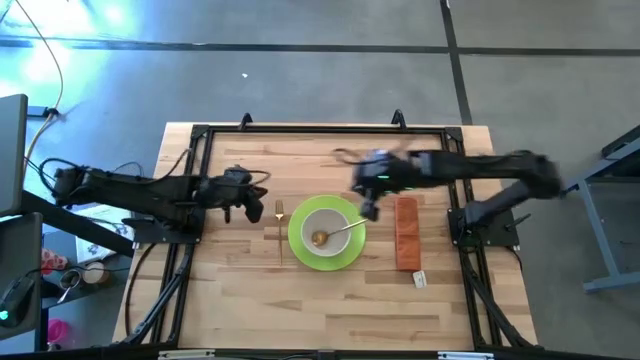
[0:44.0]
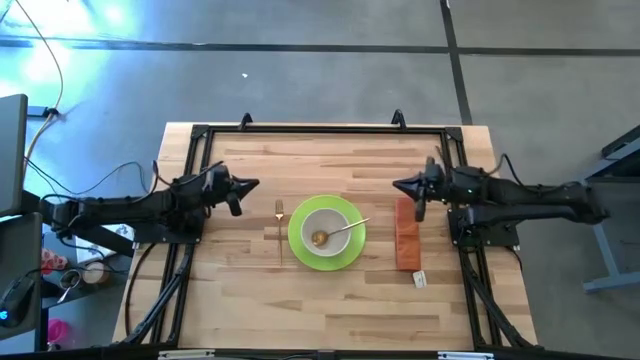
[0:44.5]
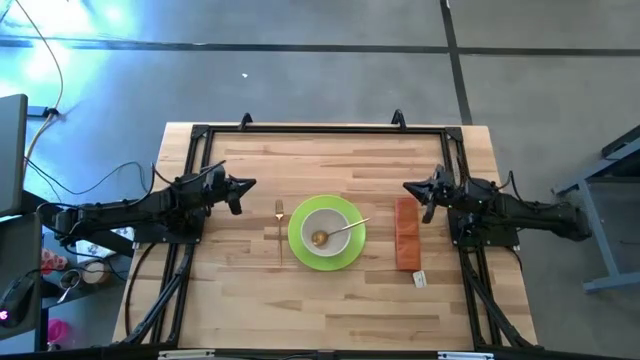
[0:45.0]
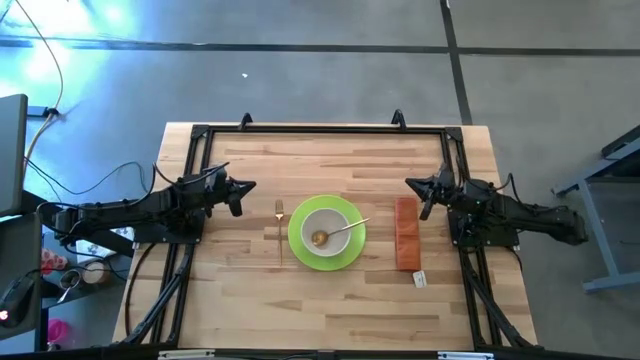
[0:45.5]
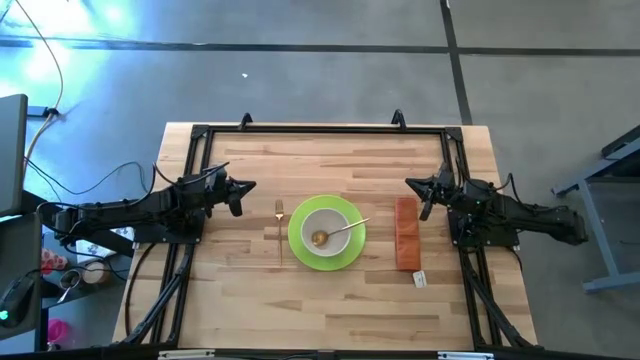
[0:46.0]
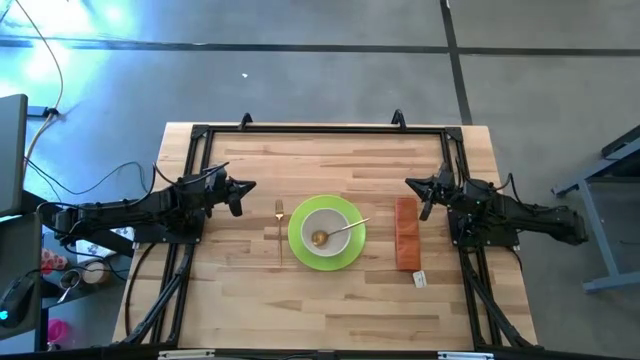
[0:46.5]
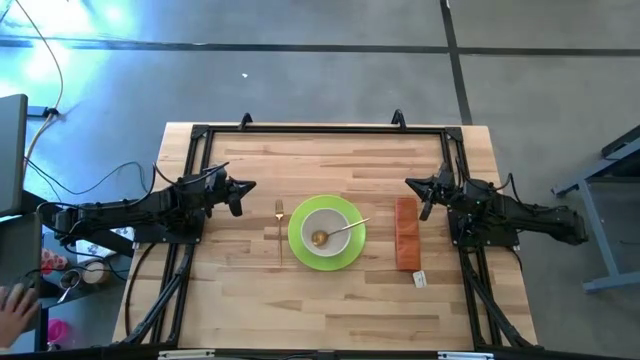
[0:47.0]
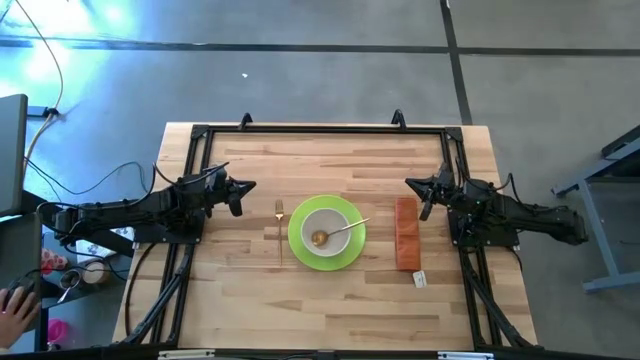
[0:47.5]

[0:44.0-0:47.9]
Task: Set table place
Return to Home Position

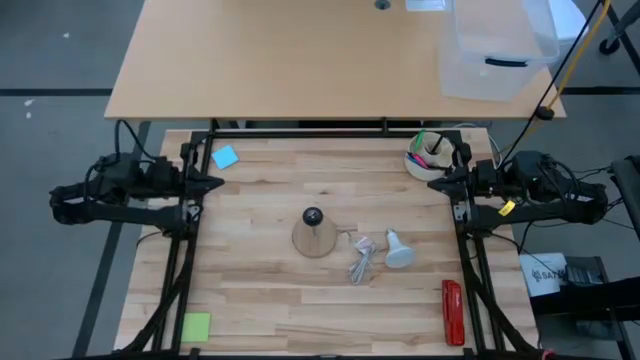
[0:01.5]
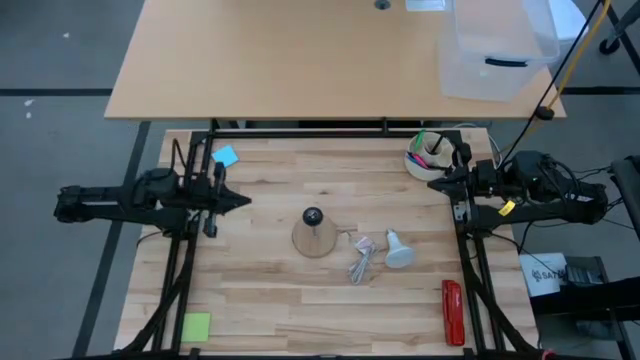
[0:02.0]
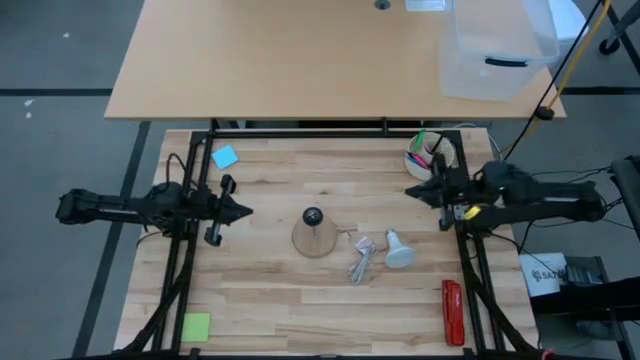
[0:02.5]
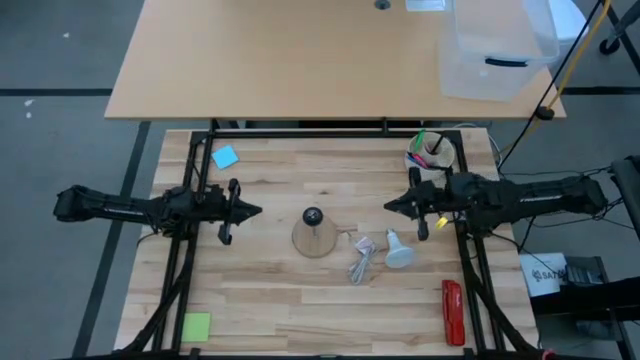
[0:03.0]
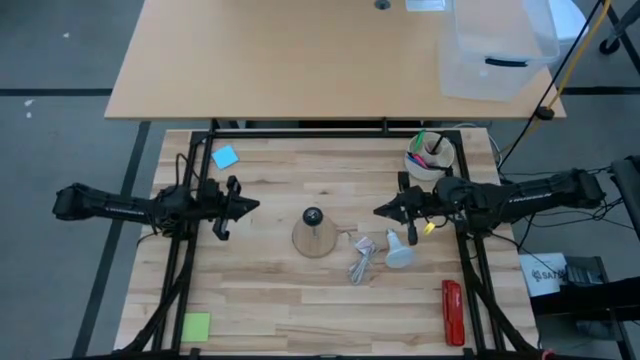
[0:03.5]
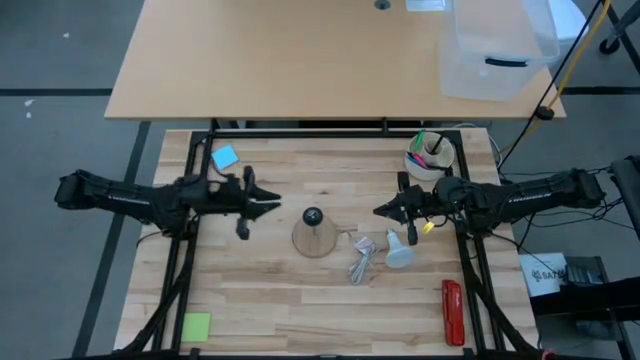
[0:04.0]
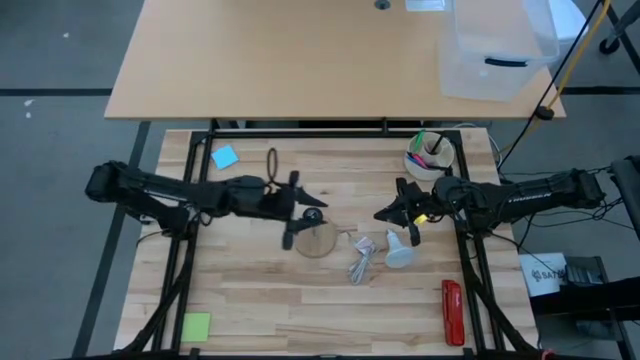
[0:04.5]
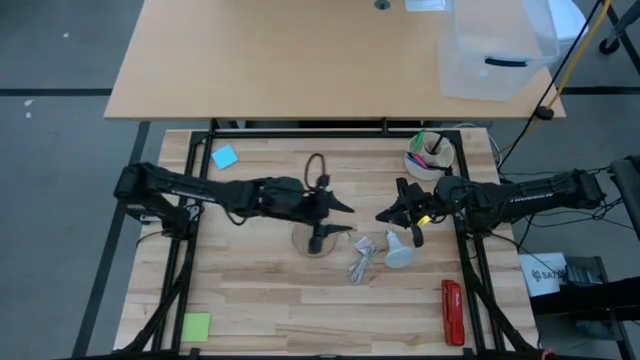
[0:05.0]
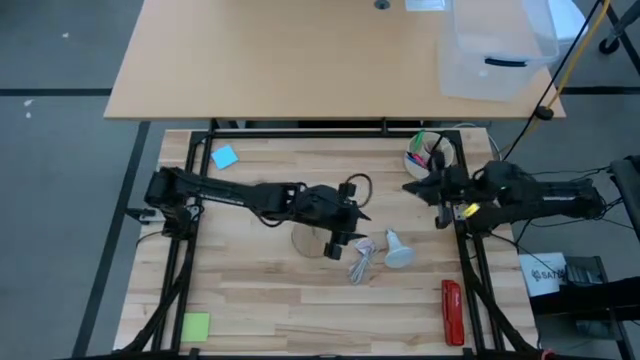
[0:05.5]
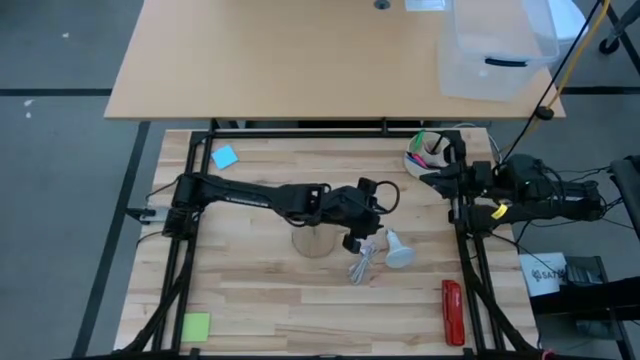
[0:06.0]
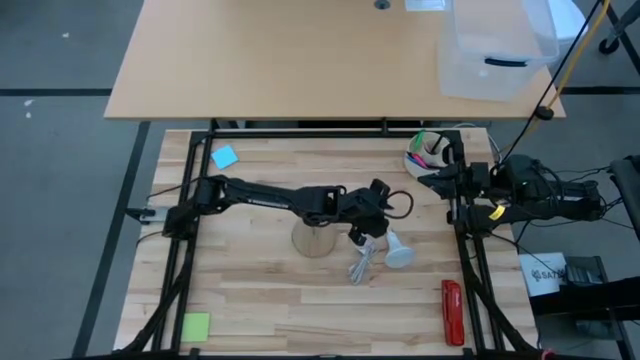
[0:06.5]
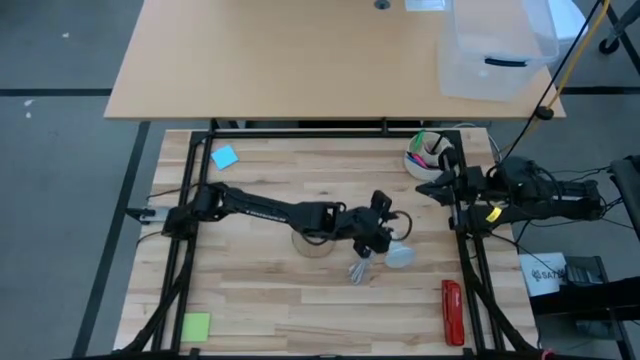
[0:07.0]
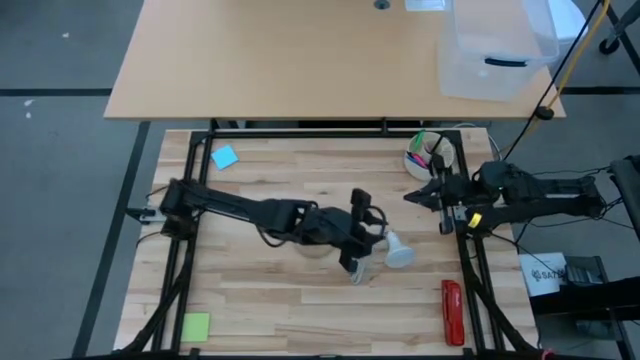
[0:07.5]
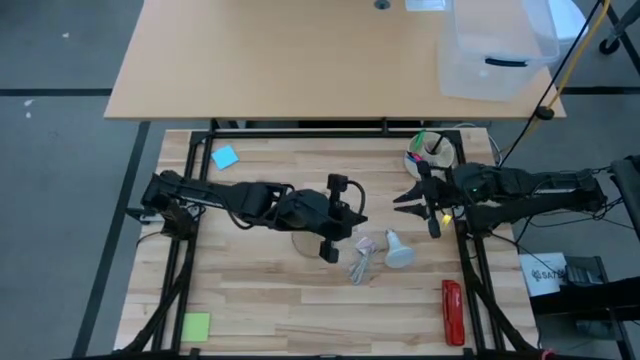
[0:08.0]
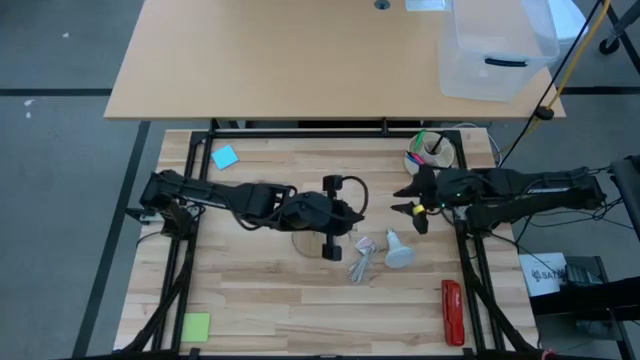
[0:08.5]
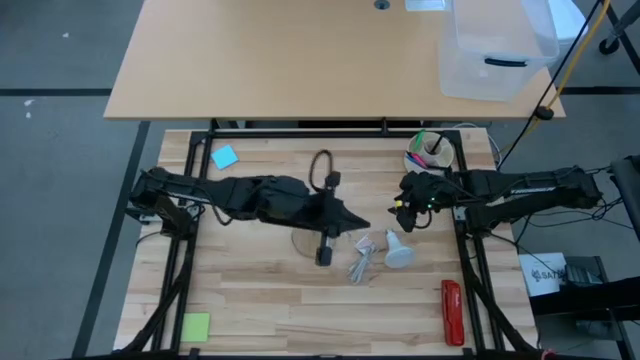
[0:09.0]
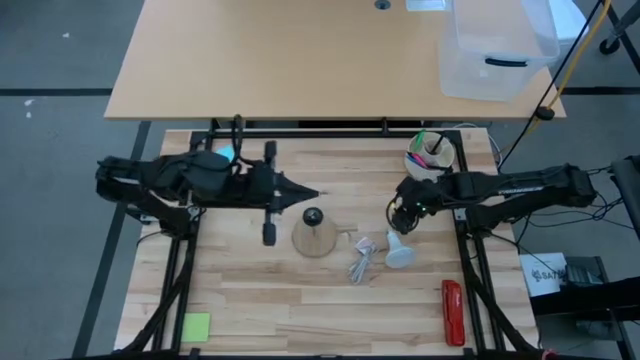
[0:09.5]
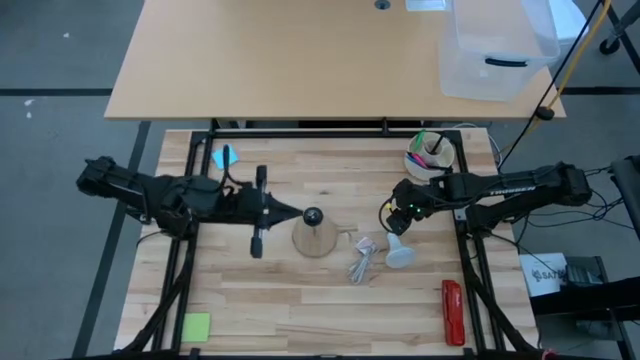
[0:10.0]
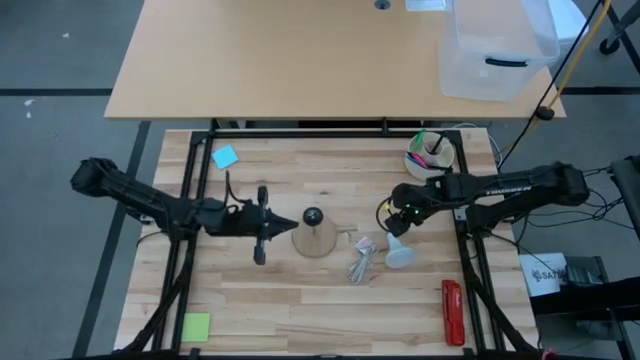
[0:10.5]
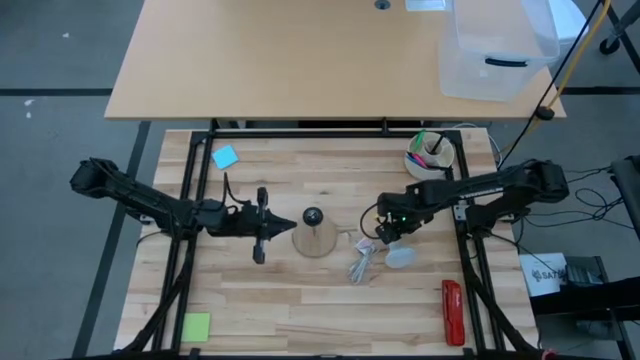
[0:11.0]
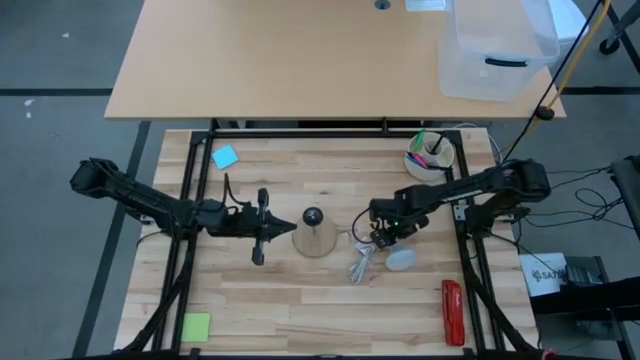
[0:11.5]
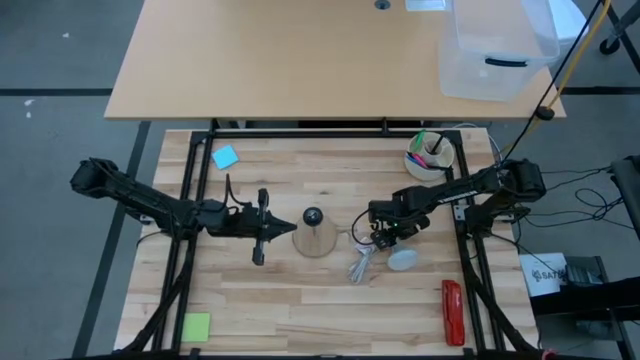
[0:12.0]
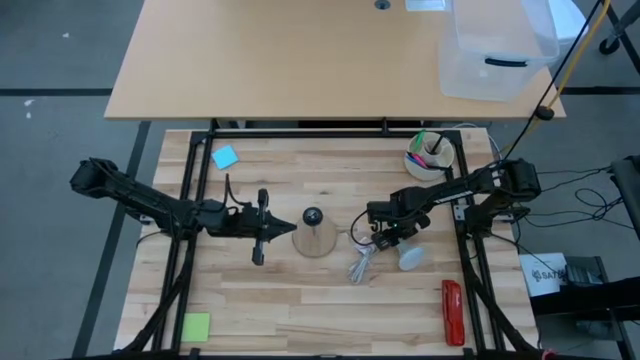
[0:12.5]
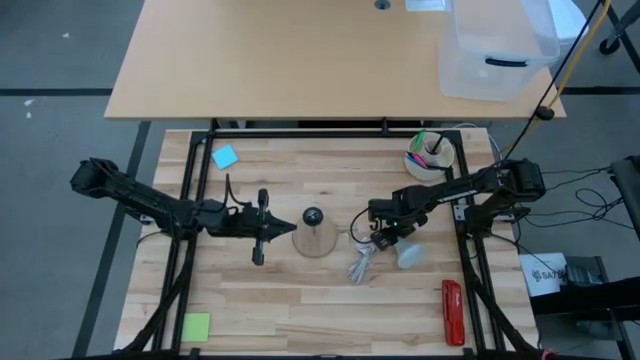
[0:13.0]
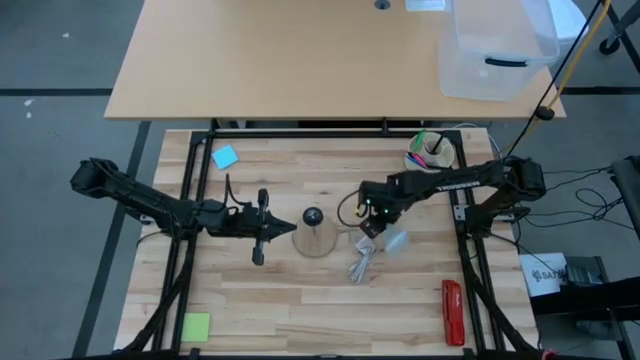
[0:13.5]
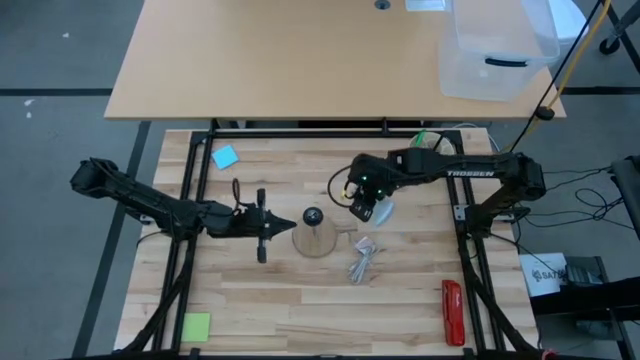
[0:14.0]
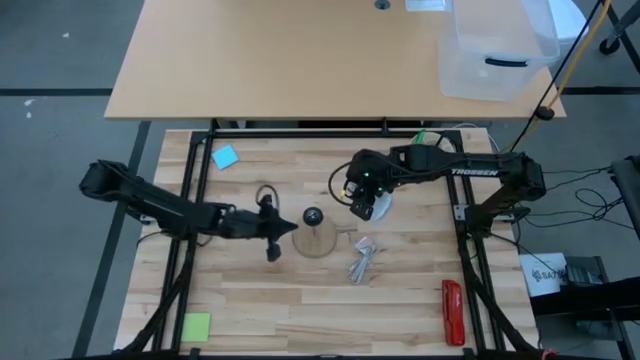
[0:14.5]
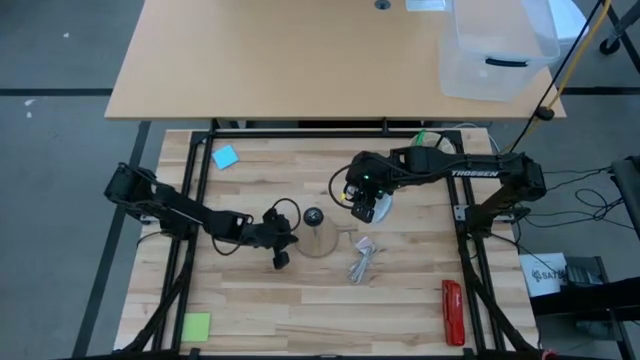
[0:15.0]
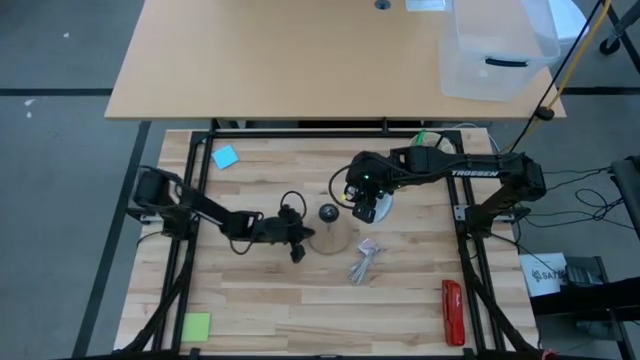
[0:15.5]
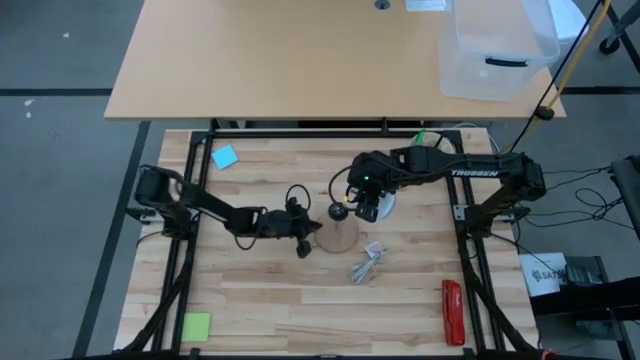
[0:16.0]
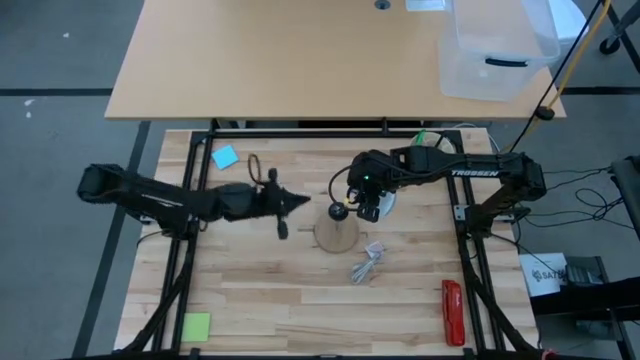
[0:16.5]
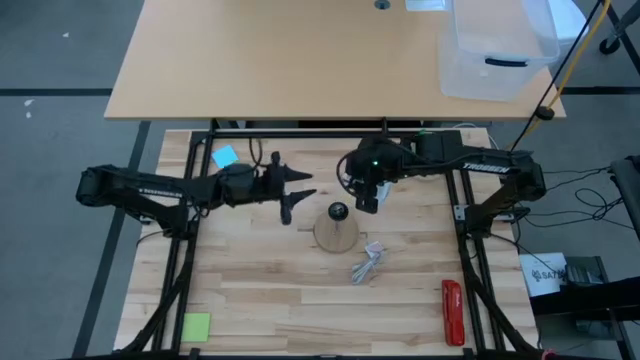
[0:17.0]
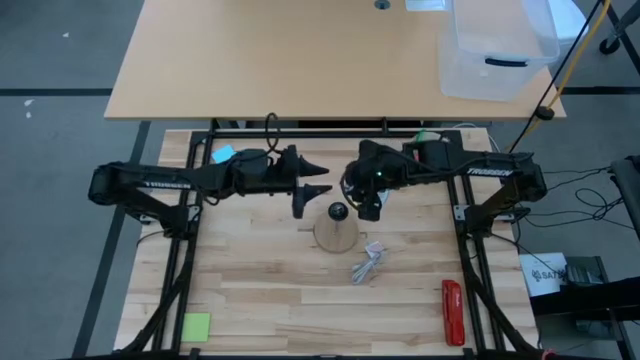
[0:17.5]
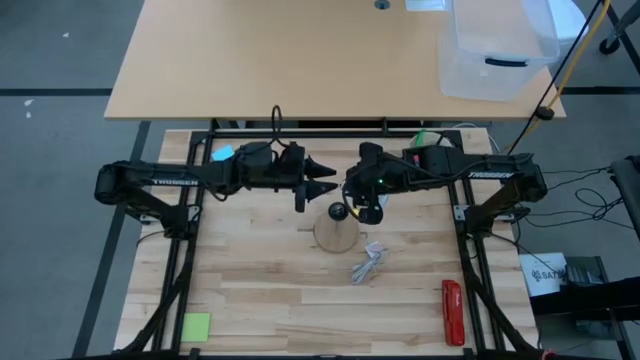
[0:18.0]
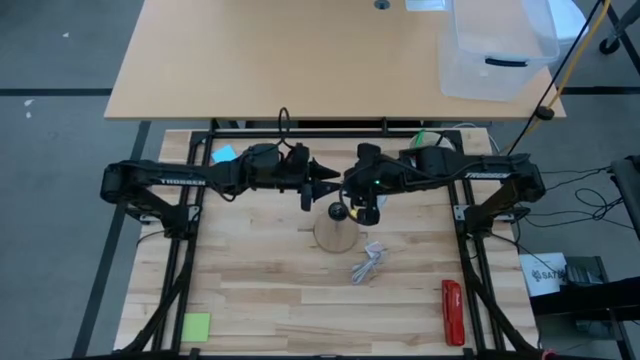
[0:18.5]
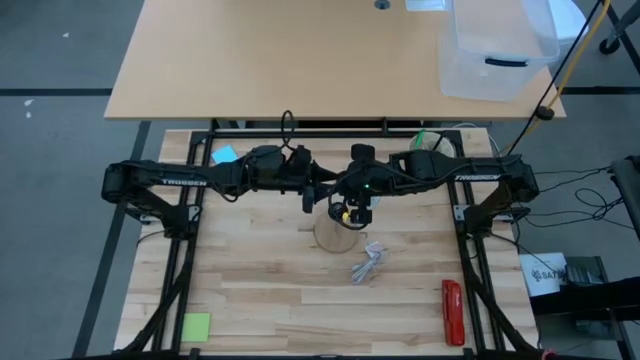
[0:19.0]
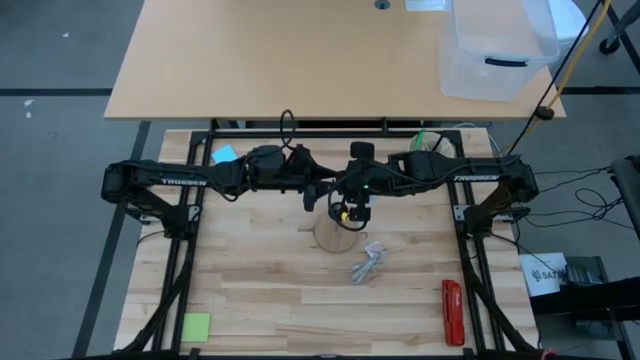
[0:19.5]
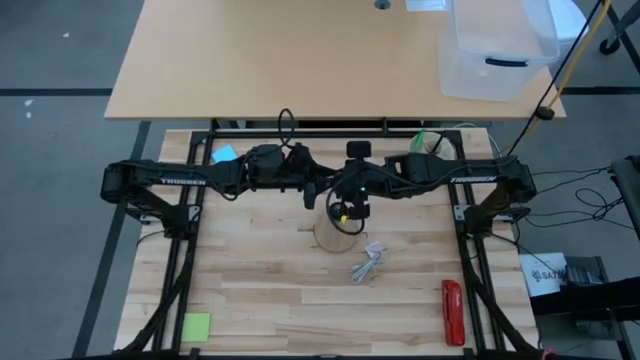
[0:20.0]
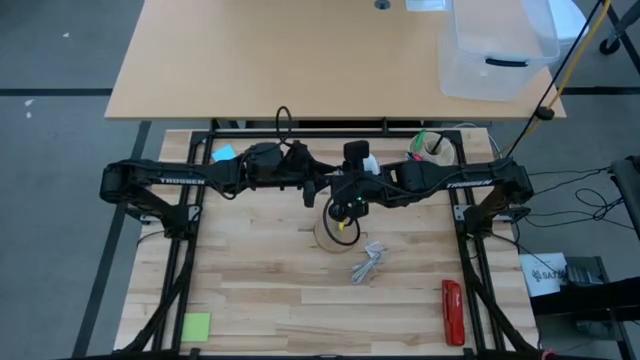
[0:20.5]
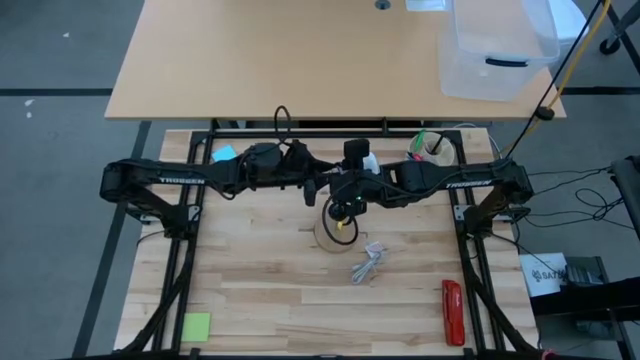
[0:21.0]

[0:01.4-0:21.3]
Task: Screw lightbulb
Insert the lightbulb into the lamp
